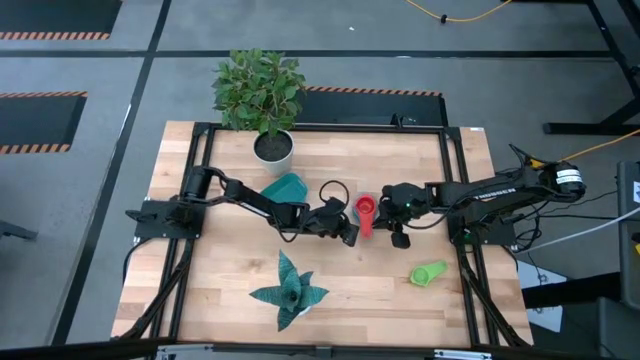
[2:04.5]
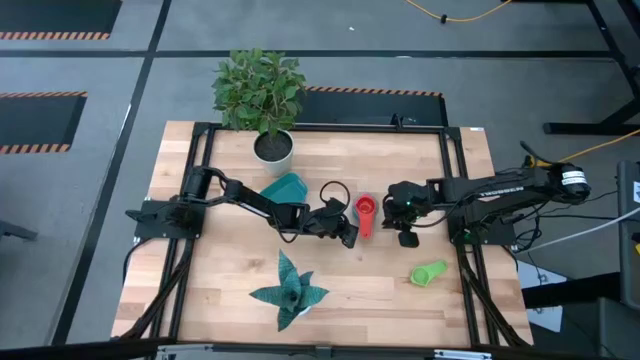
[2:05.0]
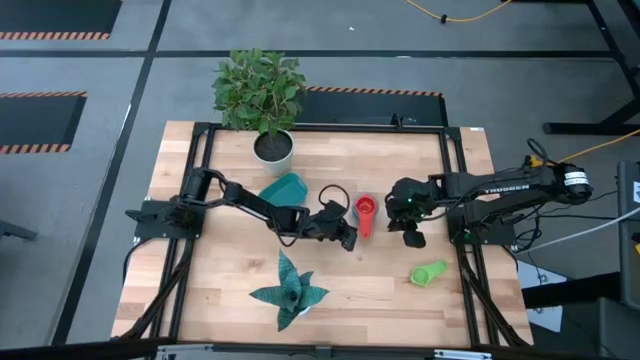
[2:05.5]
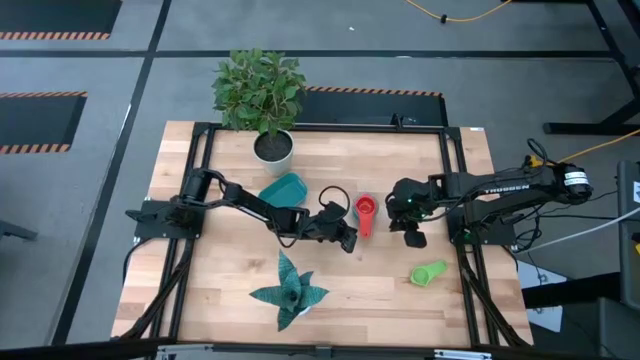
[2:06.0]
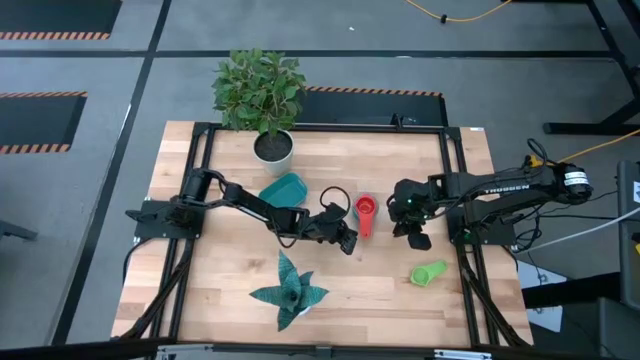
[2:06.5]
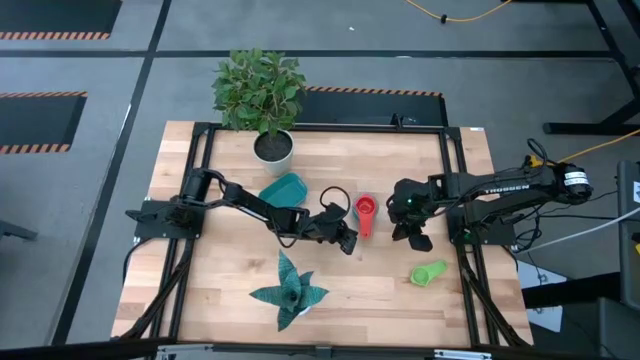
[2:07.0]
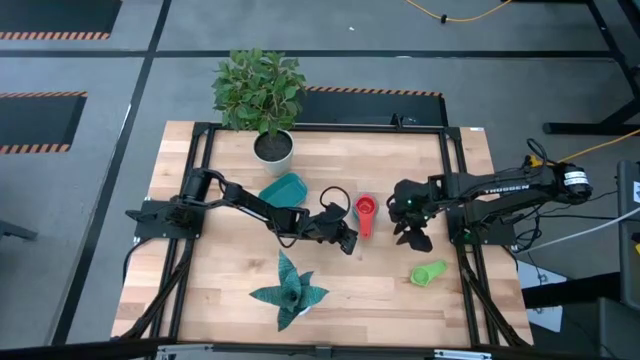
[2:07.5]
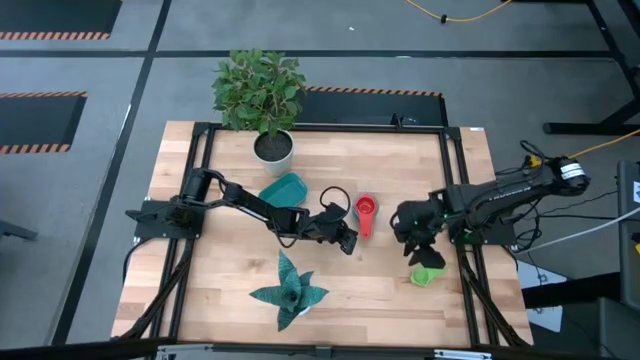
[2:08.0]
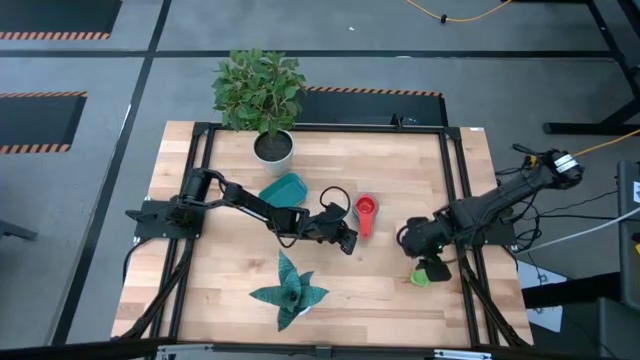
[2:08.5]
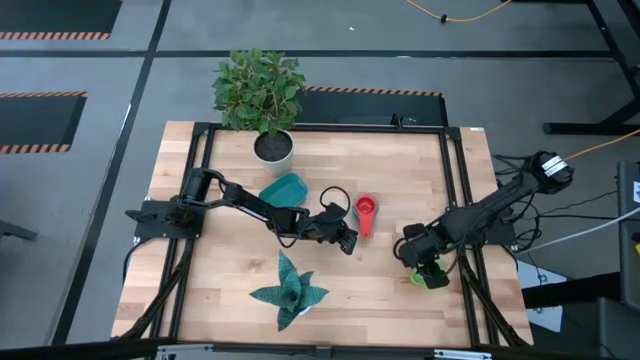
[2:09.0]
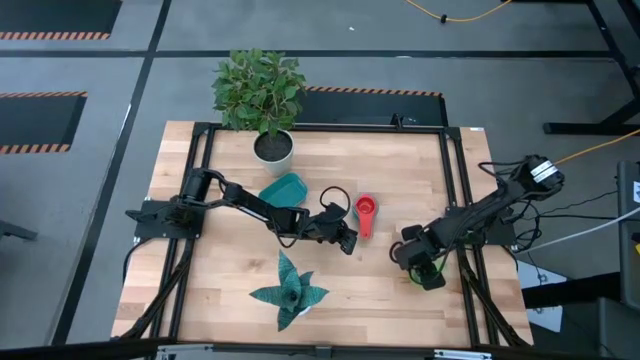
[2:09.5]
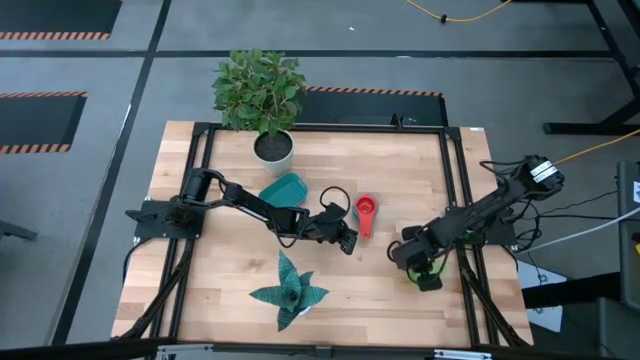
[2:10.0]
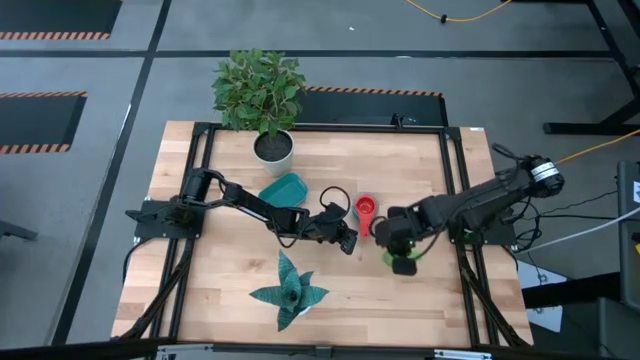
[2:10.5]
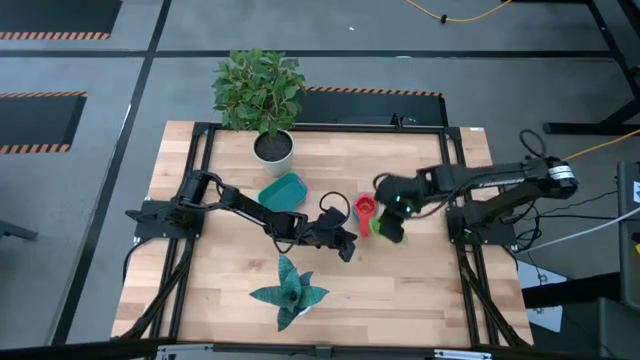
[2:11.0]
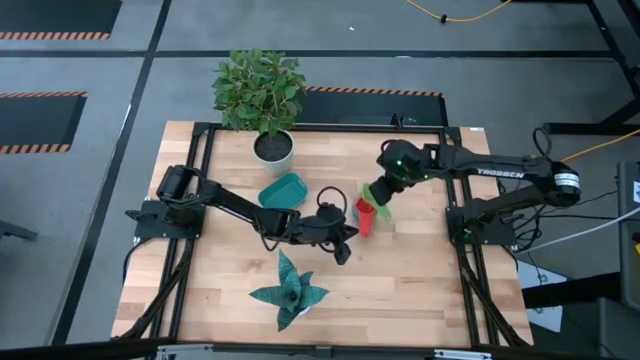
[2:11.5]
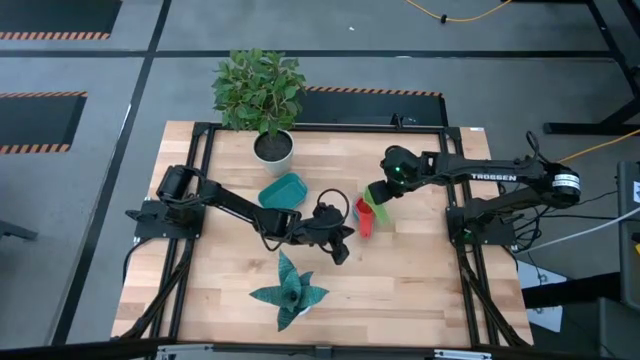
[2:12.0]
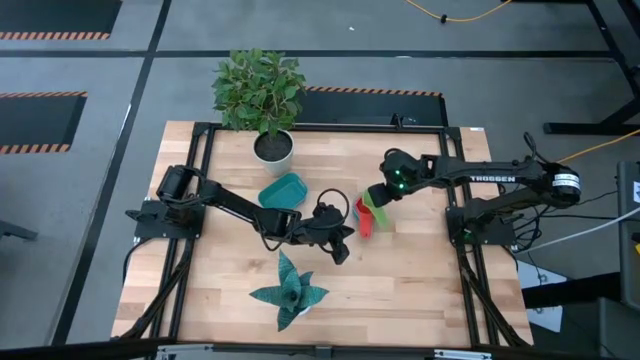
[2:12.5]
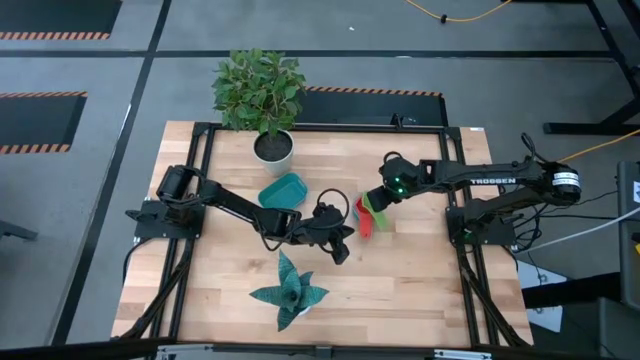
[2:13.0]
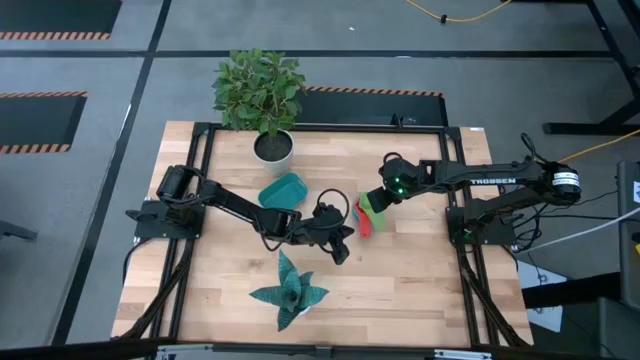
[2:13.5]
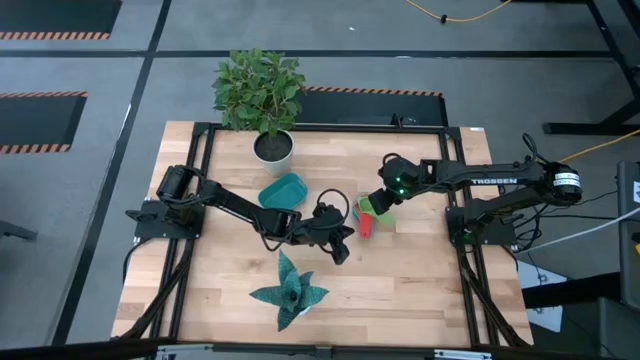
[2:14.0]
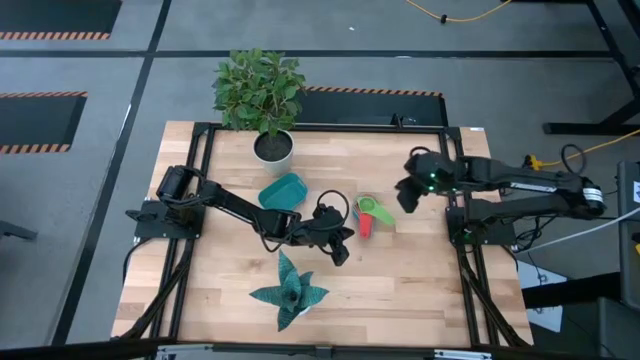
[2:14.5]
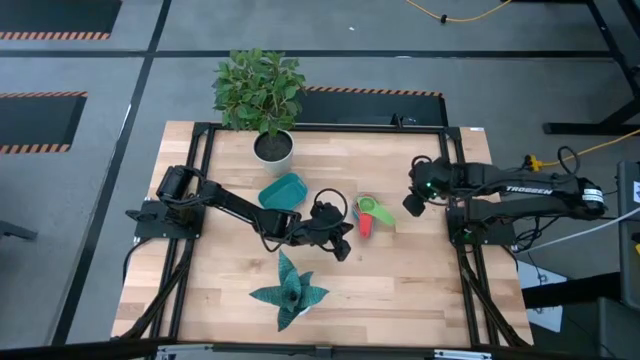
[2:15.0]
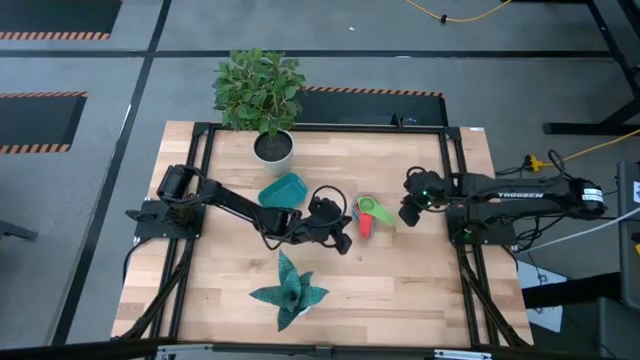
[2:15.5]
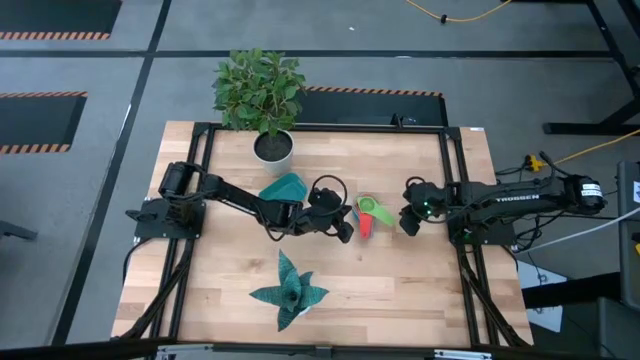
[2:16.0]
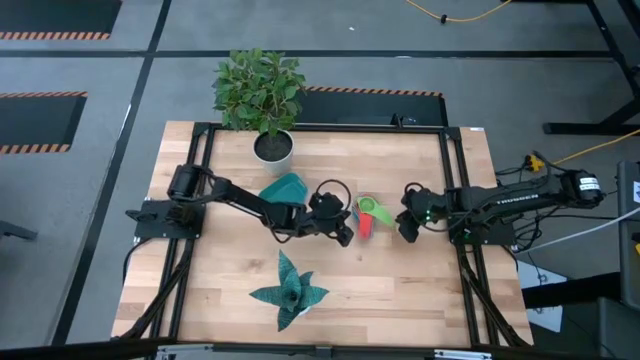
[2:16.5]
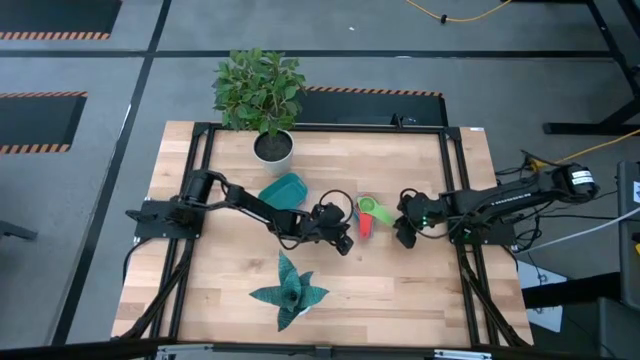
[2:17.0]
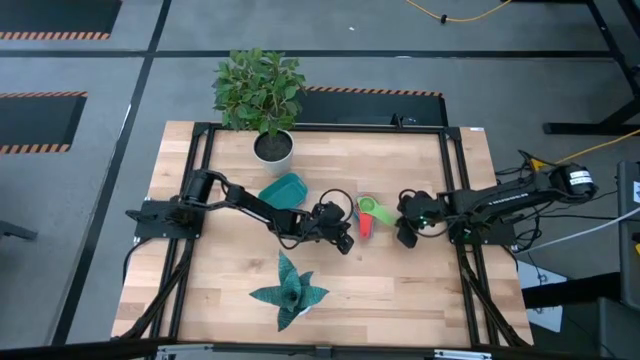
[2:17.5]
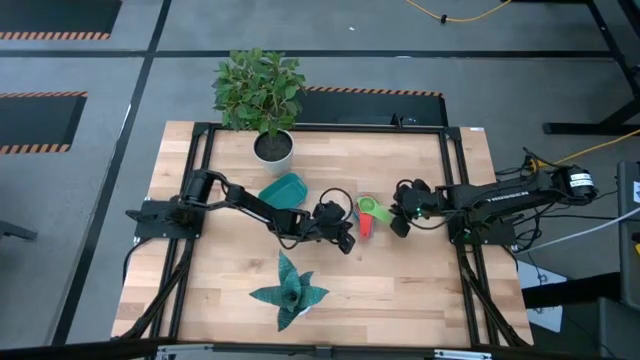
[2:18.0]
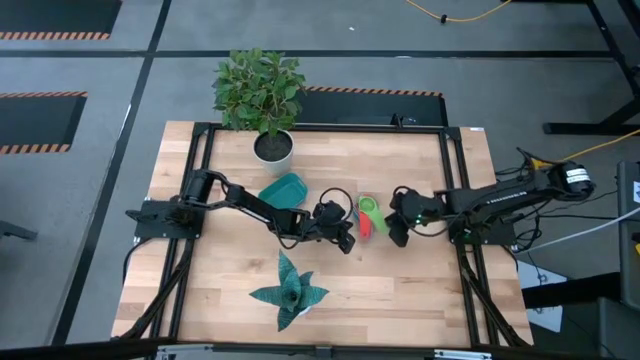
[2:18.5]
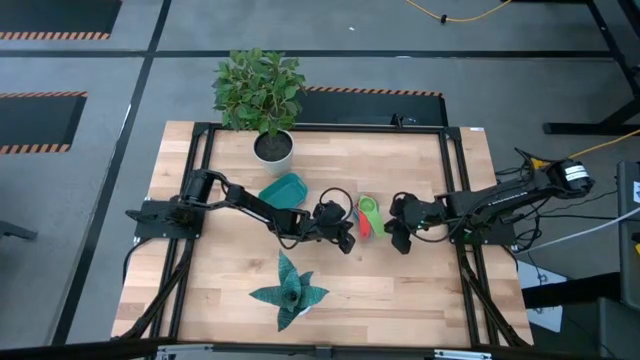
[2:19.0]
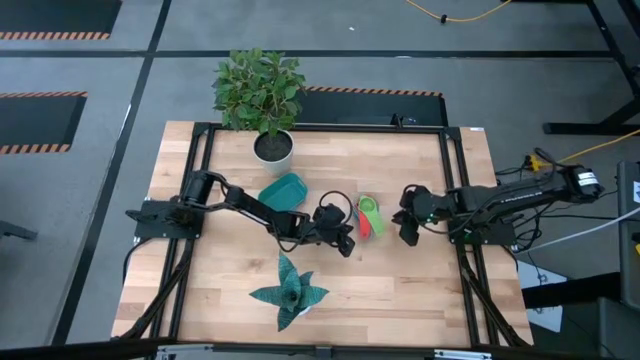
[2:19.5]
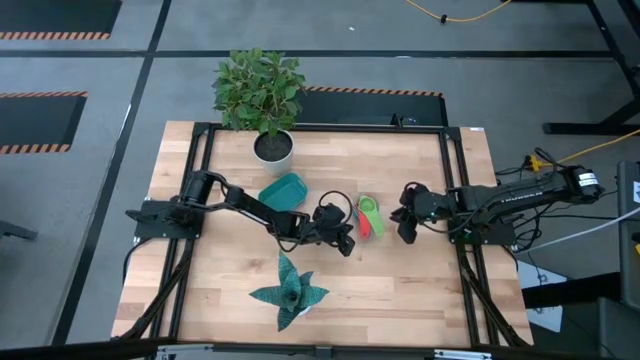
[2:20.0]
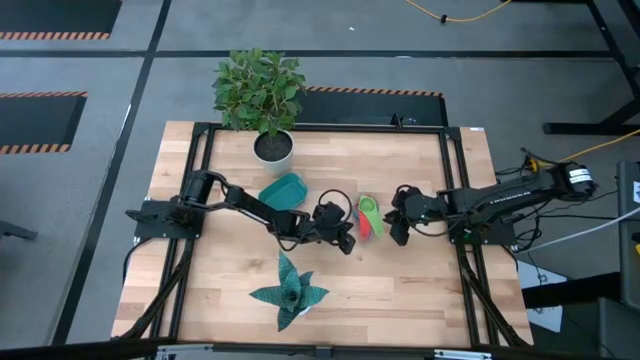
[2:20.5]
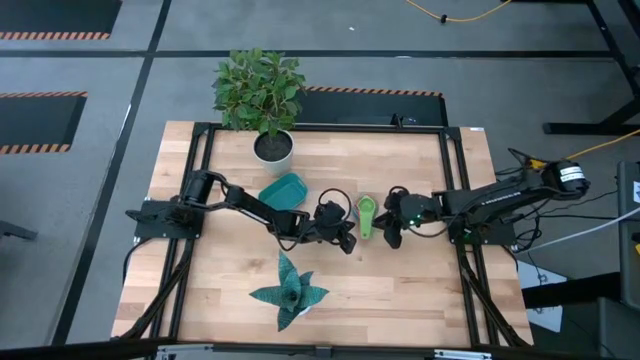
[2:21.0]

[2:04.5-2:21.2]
Task: Nest measuring cups in basket
Stack the green measuring cup on the top of the red measuring cup

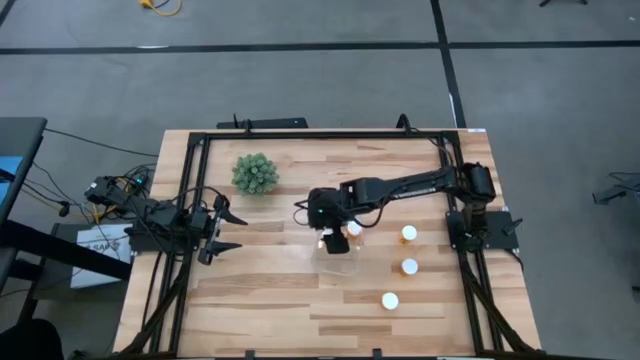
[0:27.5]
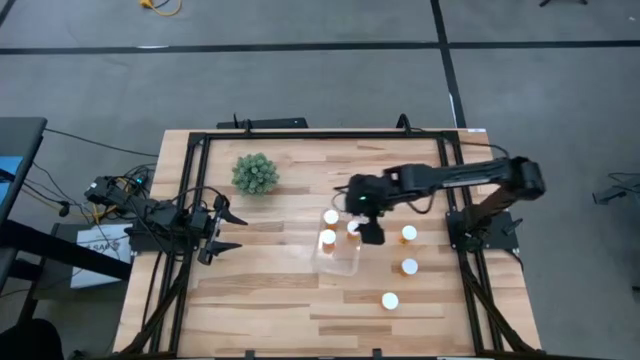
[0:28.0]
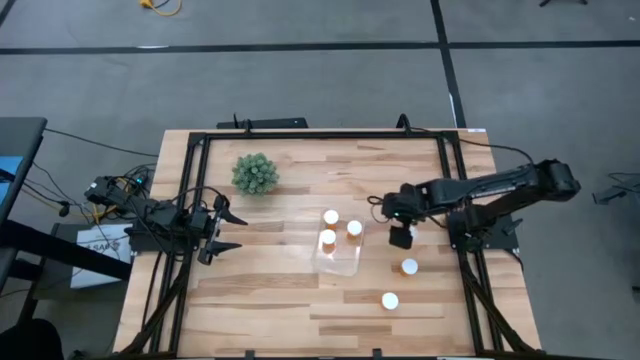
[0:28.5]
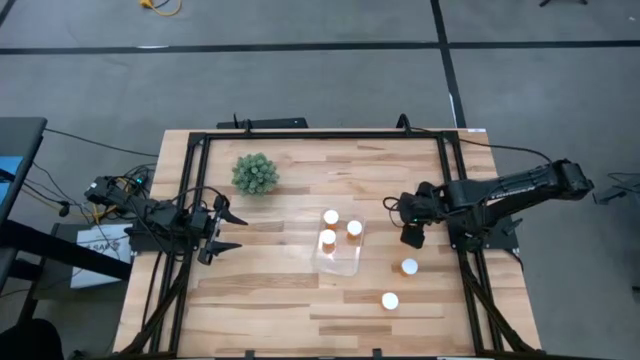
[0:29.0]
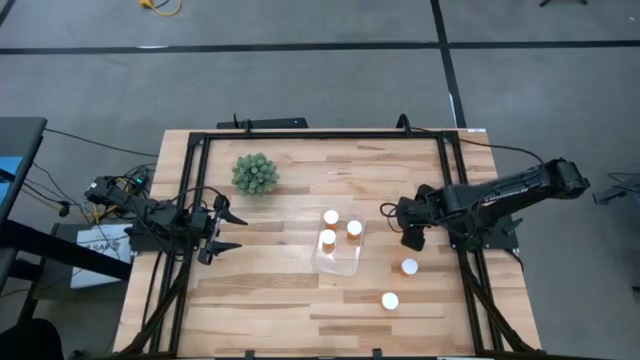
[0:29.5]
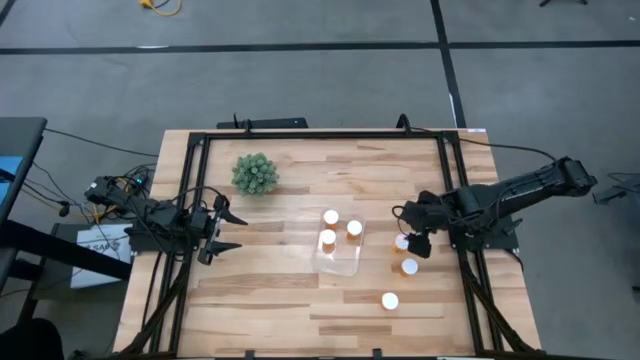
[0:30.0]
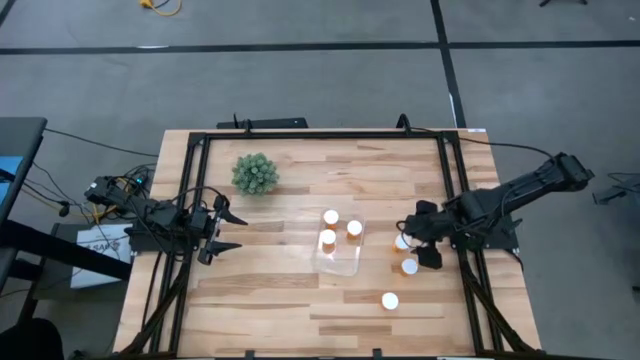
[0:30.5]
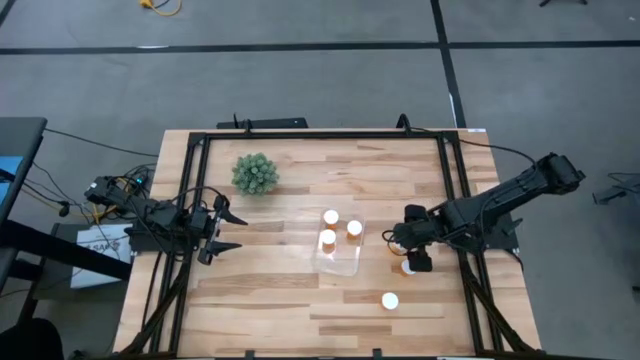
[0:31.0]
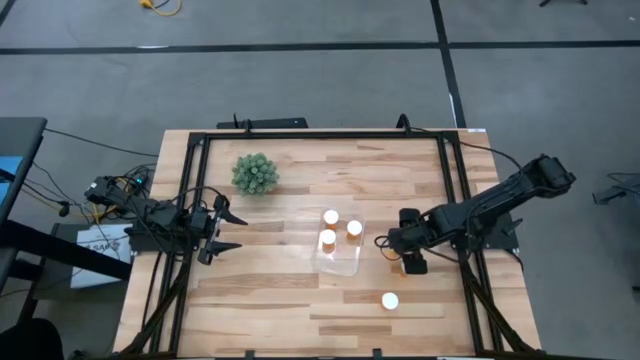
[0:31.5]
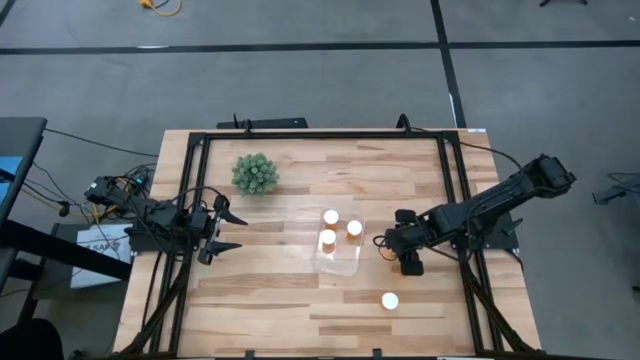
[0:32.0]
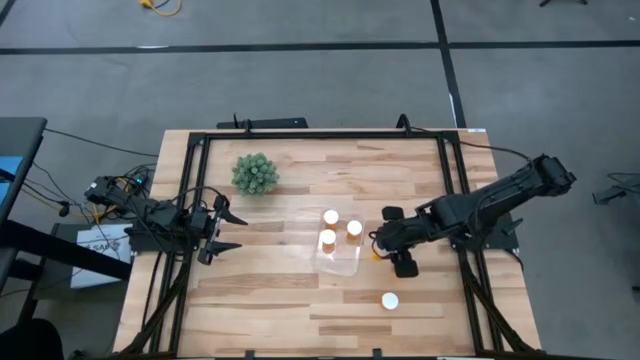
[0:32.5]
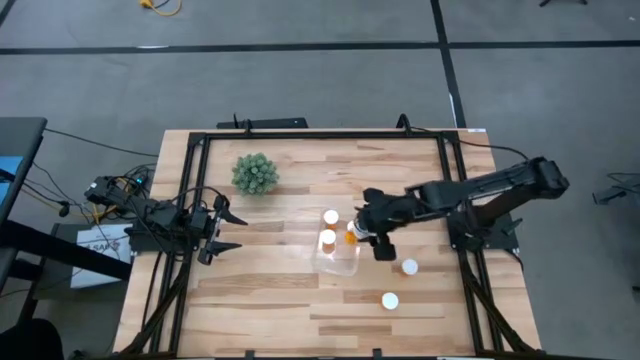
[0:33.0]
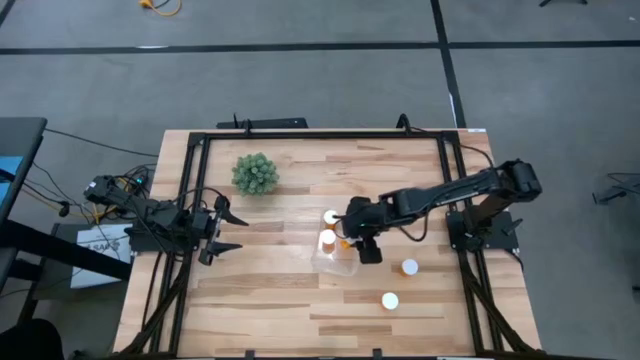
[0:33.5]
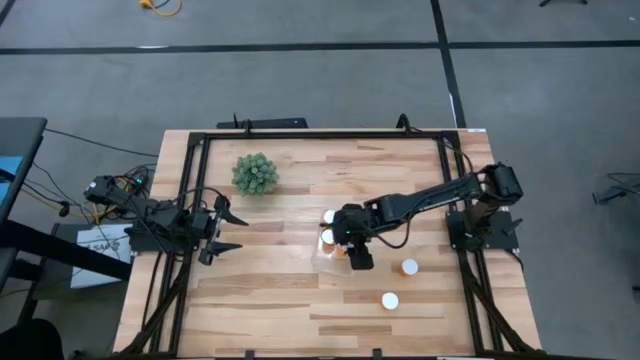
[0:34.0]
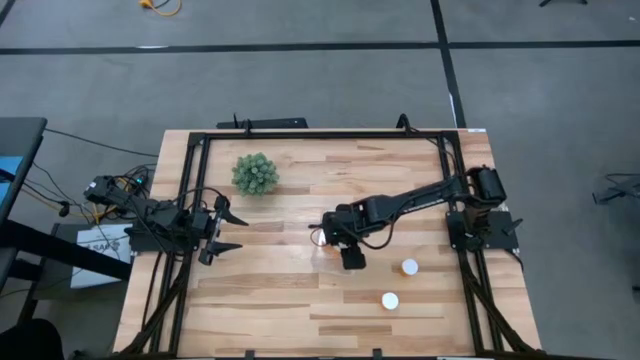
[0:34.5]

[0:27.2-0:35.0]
Task: Pick and place pill bottles into a basket
Put the orange medicine bottle into the transparent bin
